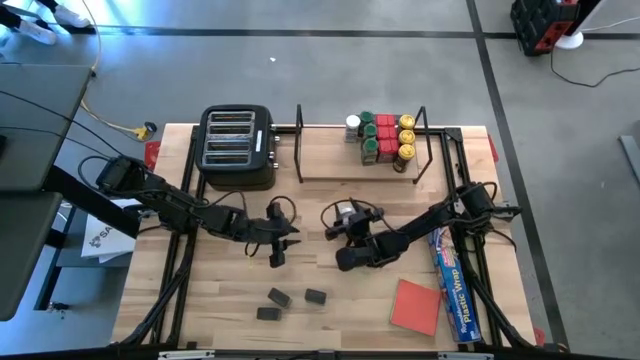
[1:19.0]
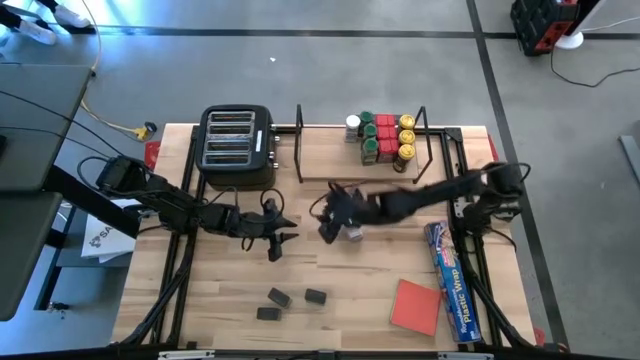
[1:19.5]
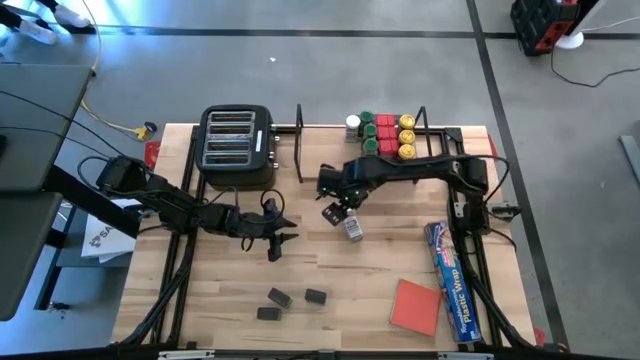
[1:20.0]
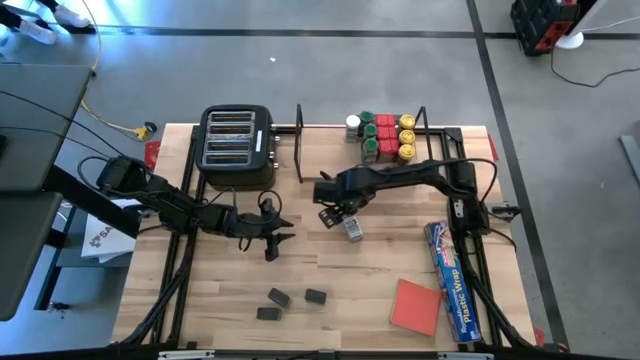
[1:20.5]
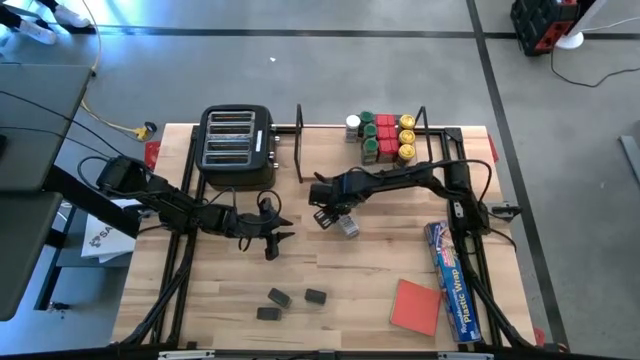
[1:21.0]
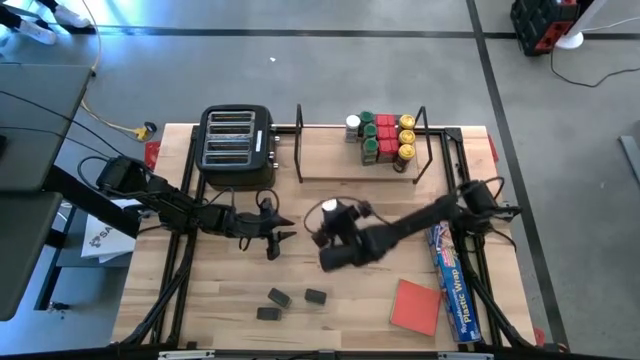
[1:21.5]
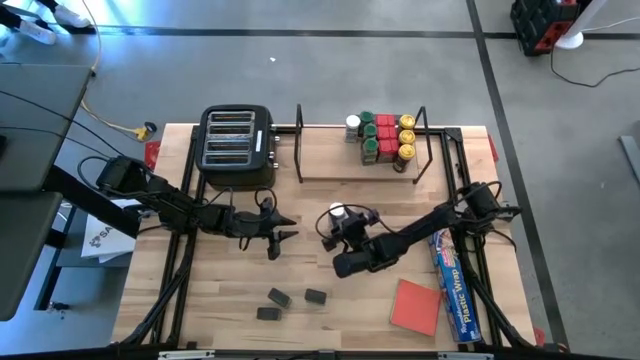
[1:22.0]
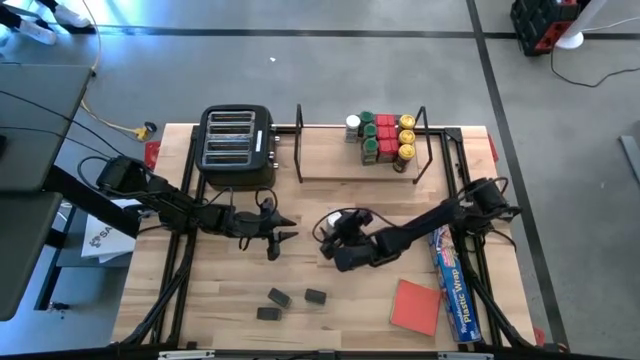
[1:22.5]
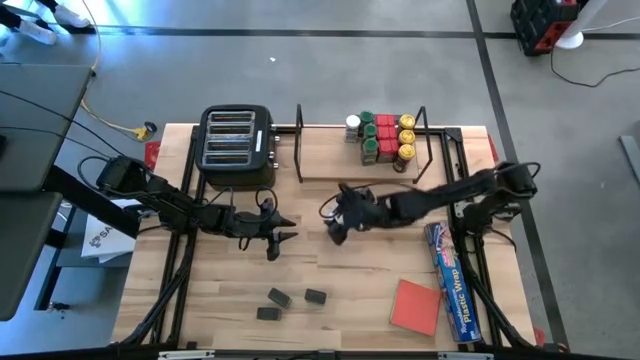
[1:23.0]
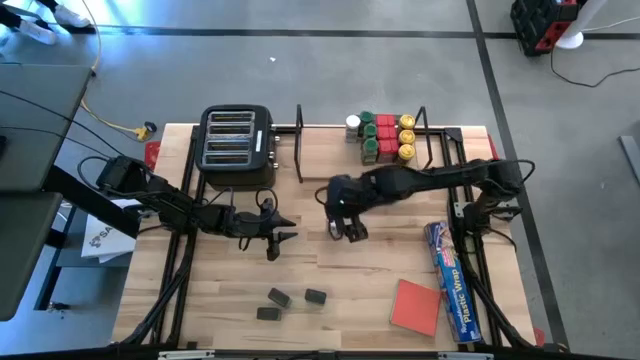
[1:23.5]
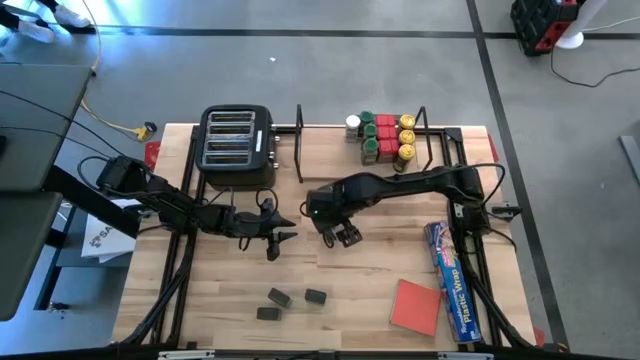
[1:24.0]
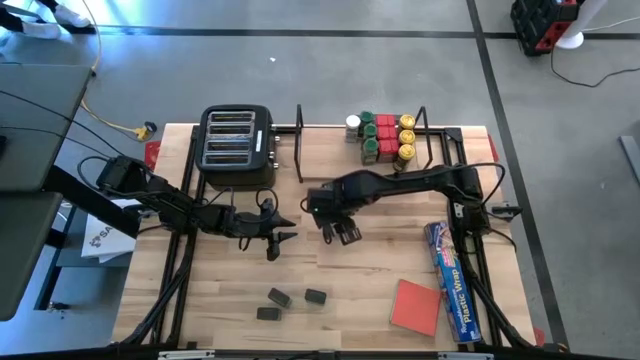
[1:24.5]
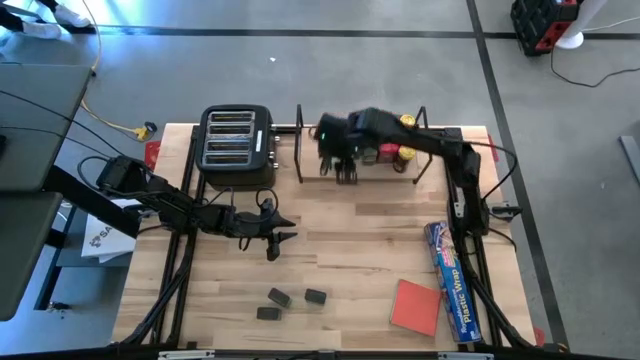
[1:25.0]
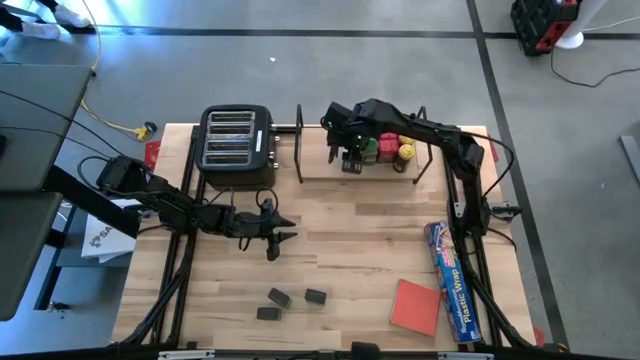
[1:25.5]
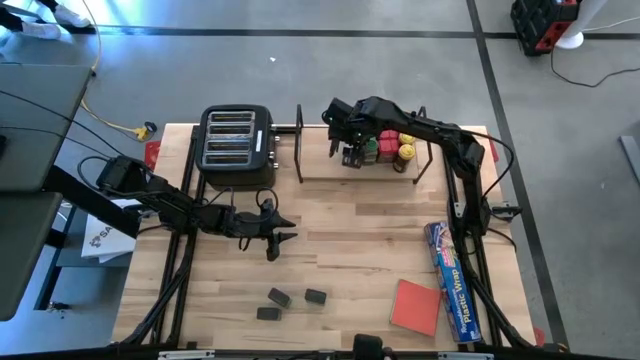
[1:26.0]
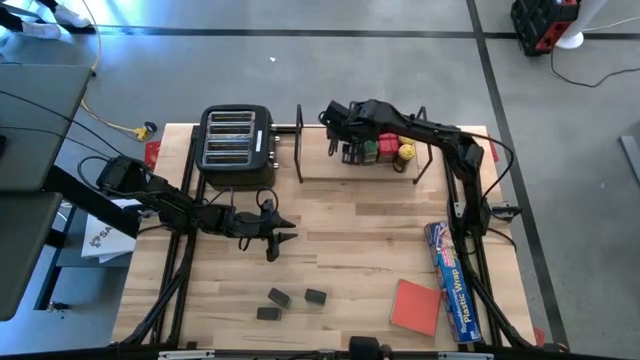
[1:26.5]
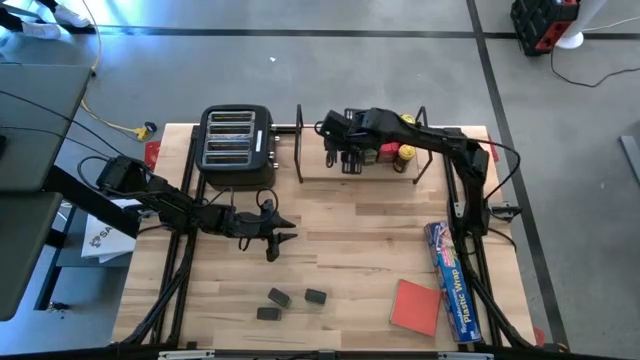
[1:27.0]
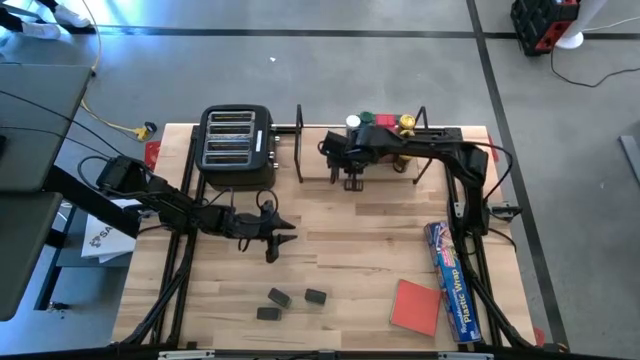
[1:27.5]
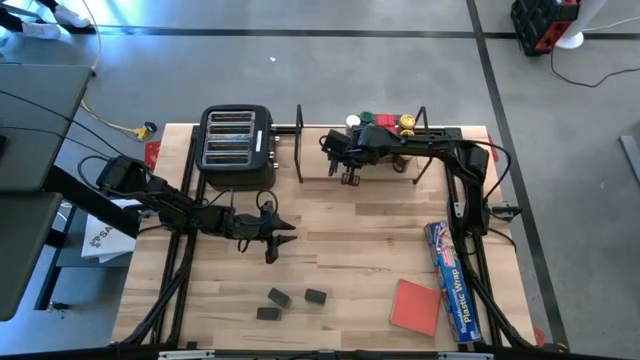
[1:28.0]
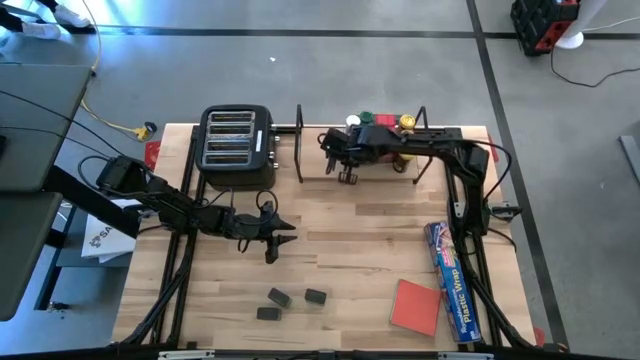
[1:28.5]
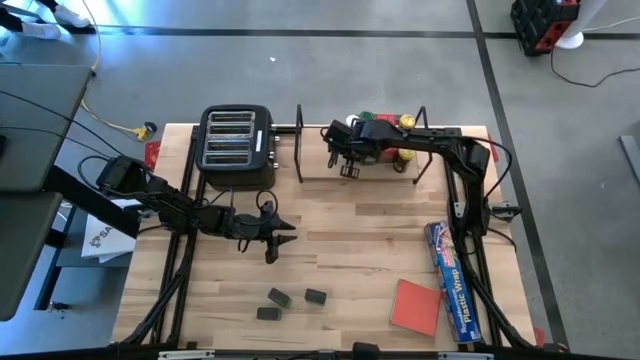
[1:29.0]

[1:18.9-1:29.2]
Task: Shelf spices
Put the white seasoning bottle on the shelf aligned with the other white seasoning bottle

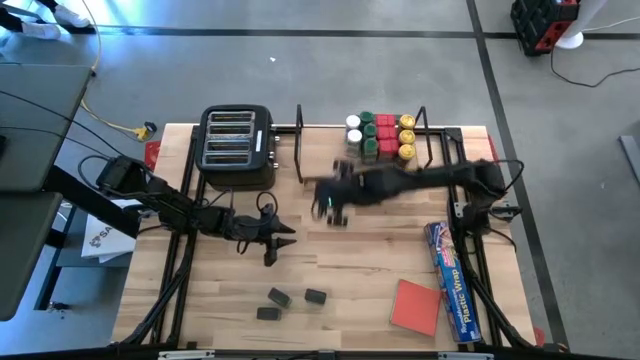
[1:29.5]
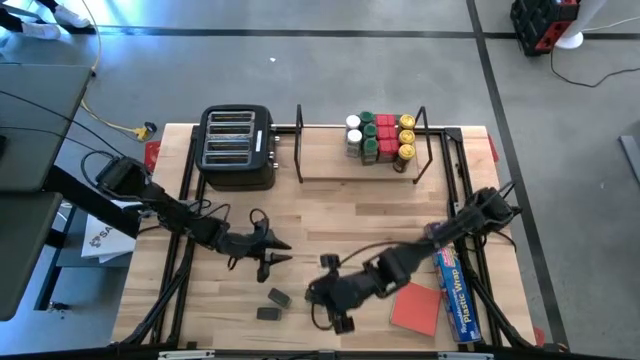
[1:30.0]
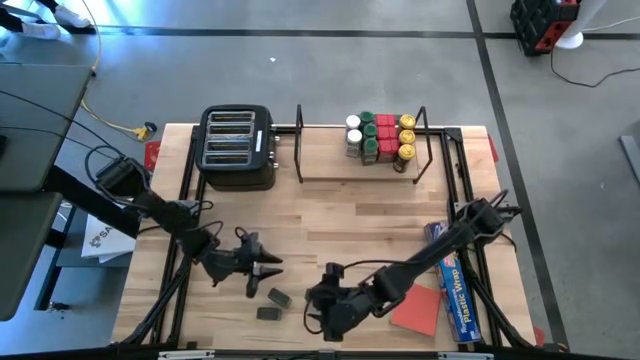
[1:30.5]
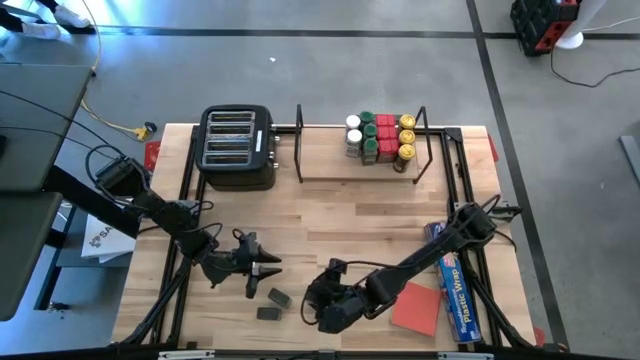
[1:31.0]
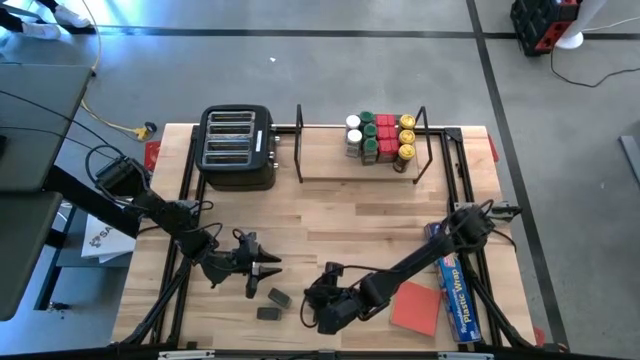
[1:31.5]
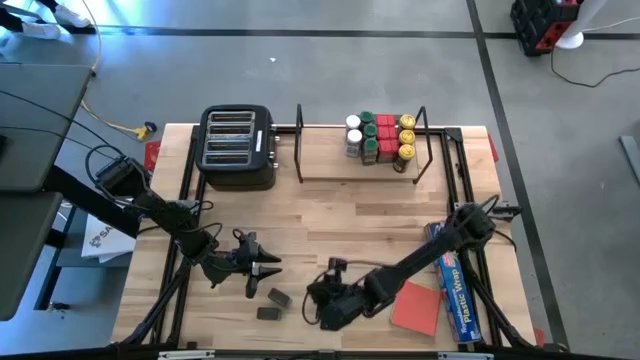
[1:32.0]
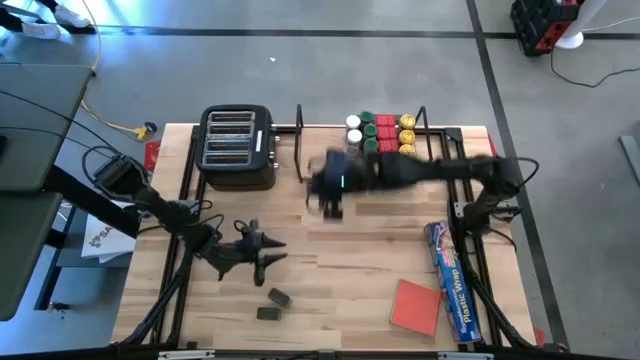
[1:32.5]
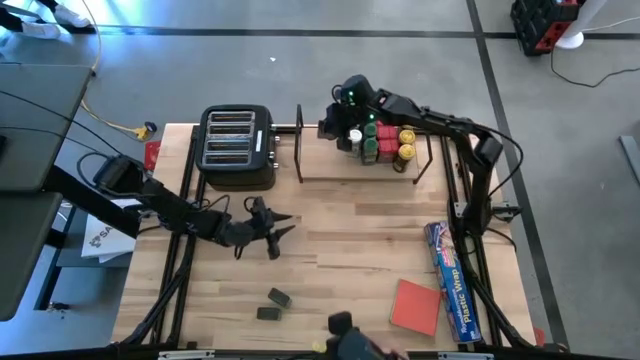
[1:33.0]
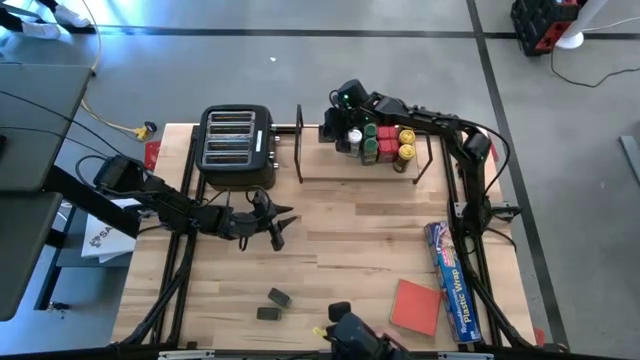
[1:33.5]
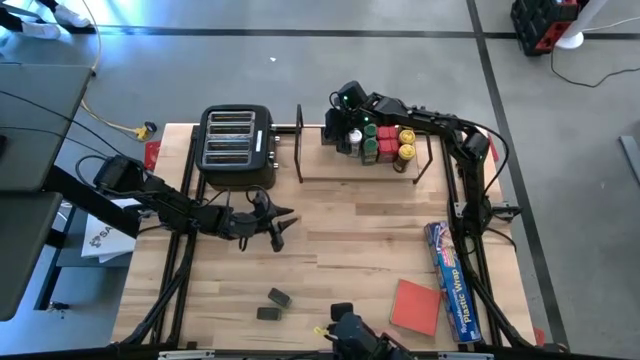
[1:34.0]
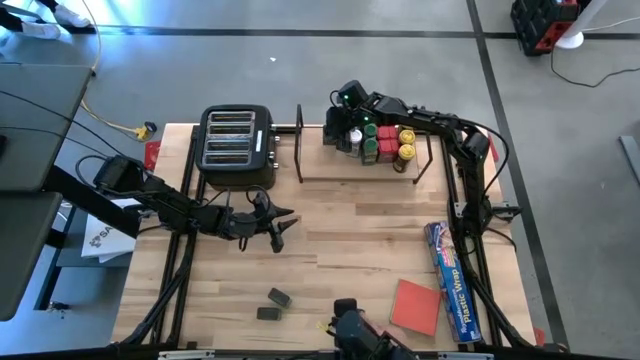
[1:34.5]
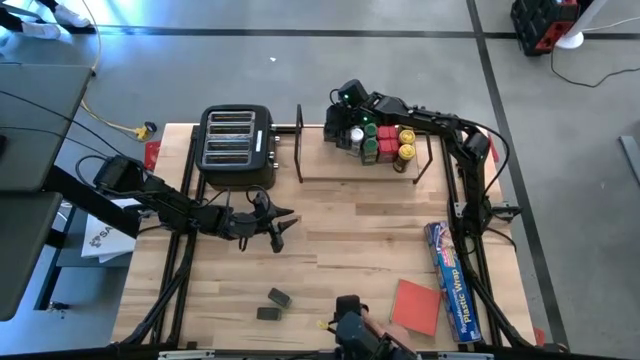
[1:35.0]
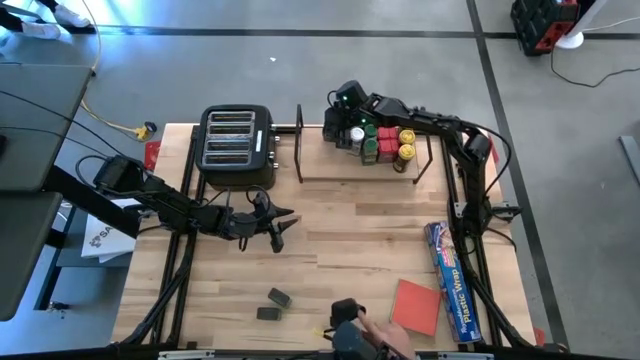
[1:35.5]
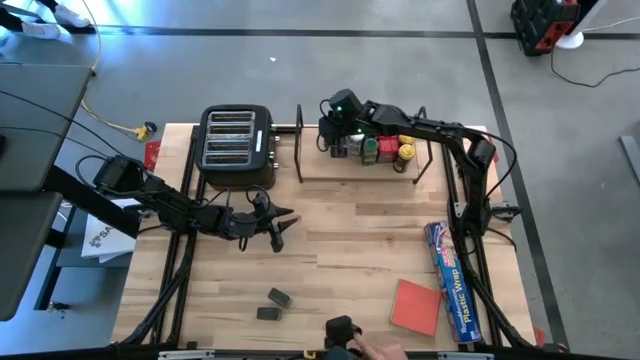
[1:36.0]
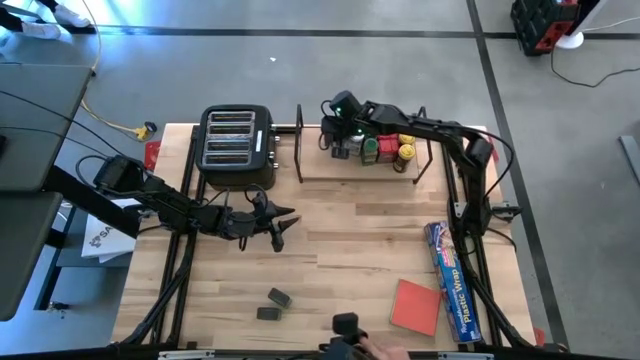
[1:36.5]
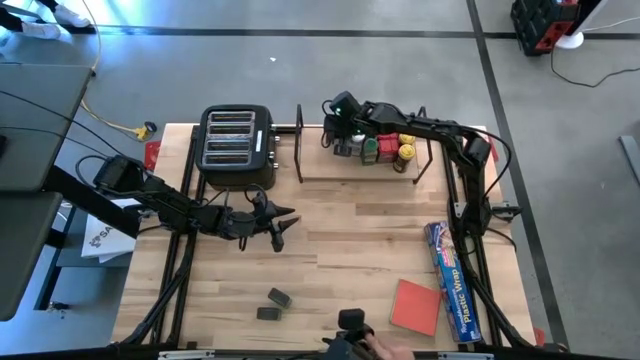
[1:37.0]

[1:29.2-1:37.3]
Put the top right green seasoning can on the shelf

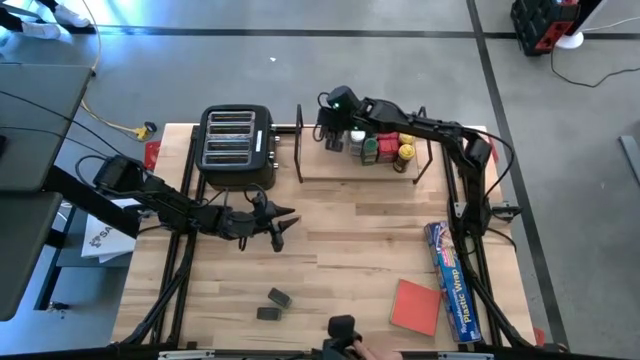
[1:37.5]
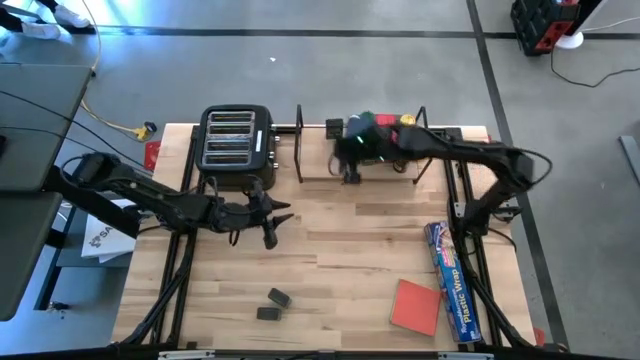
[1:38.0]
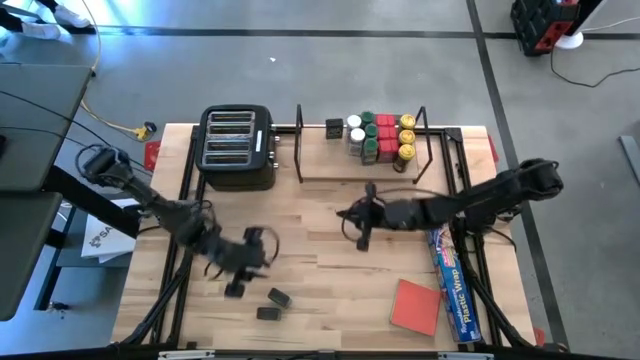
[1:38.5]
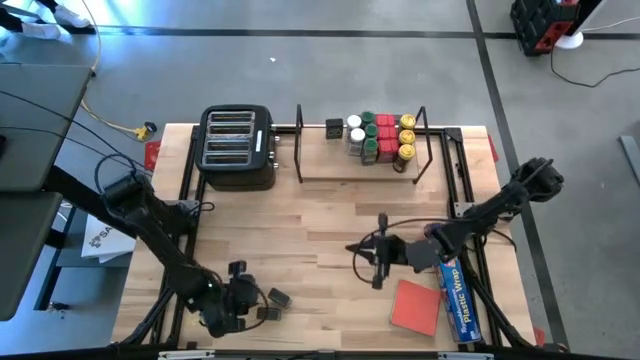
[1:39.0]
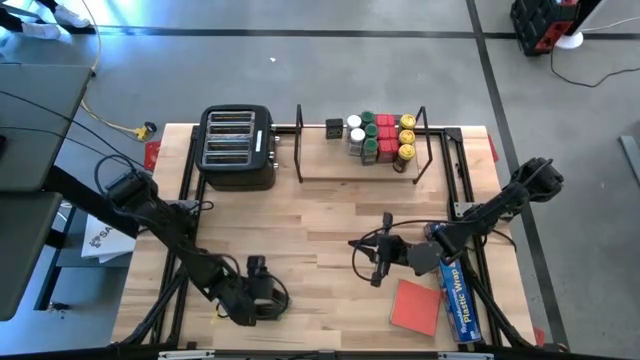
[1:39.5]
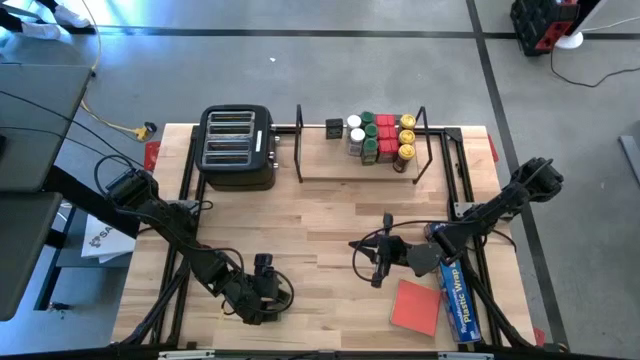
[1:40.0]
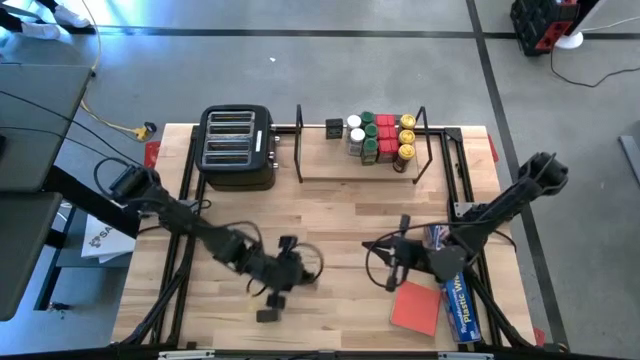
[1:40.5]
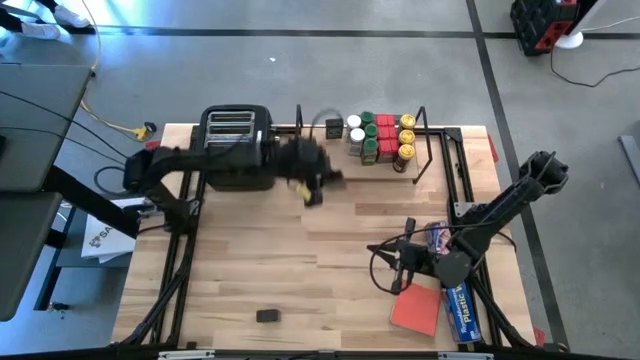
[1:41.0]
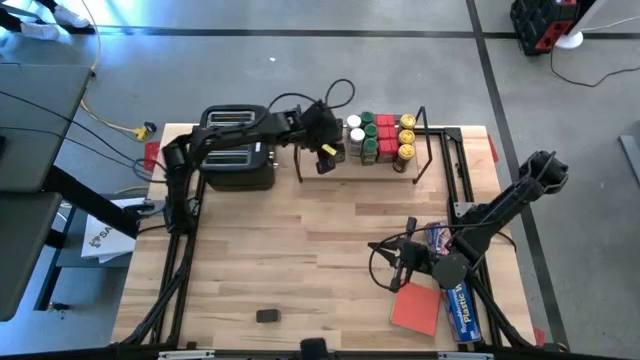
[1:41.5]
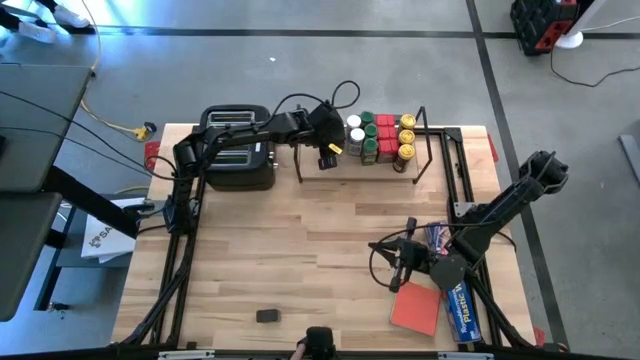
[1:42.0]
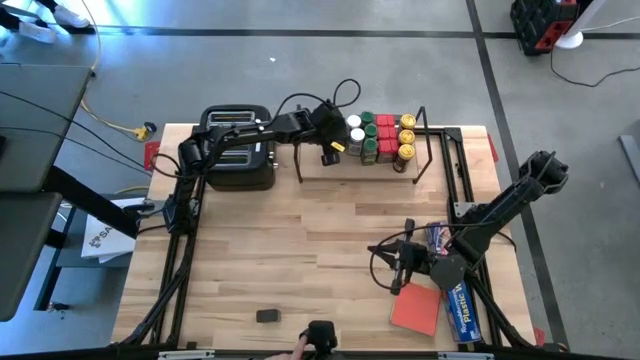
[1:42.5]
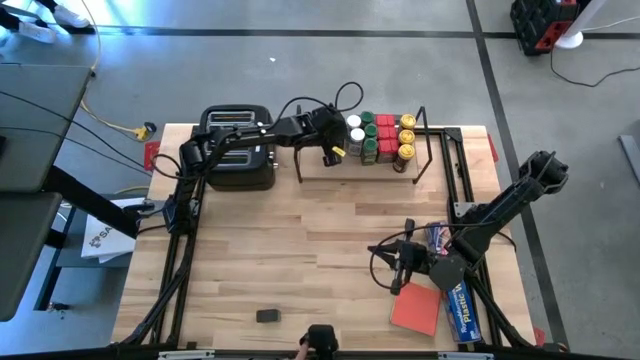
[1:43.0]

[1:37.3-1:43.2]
Put the top green seasoning can on the shelf aligned with the other green seasoning can
